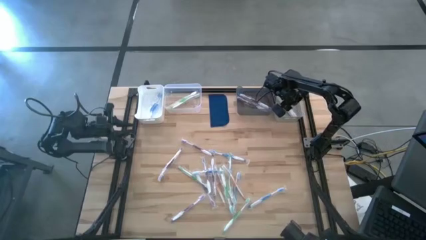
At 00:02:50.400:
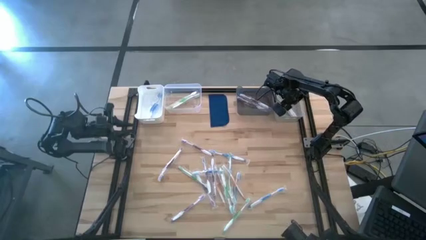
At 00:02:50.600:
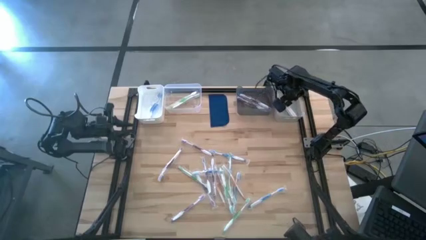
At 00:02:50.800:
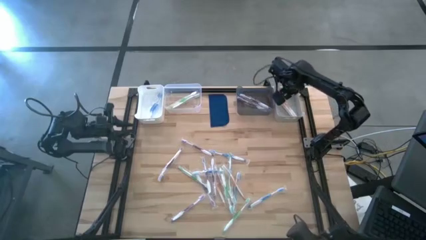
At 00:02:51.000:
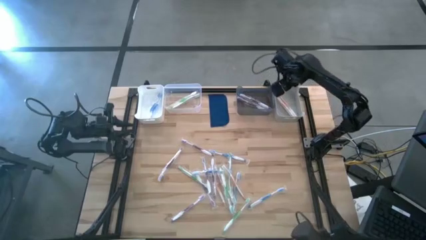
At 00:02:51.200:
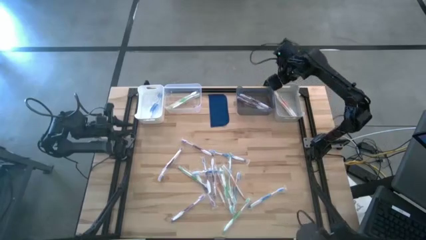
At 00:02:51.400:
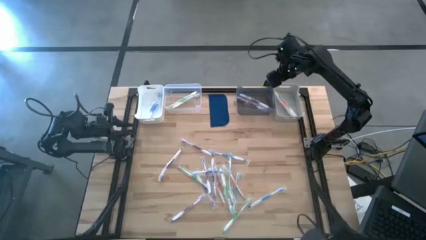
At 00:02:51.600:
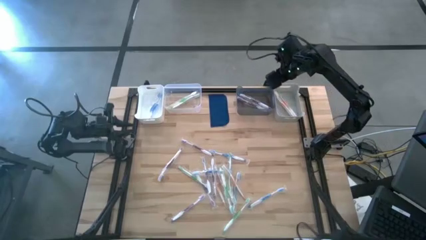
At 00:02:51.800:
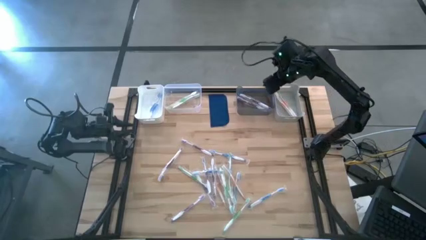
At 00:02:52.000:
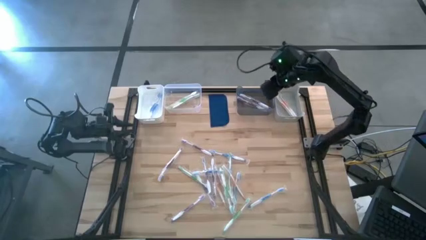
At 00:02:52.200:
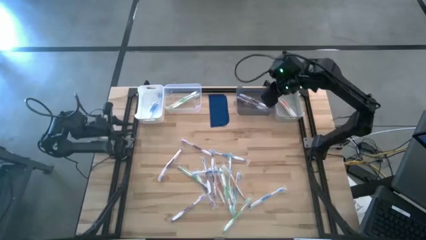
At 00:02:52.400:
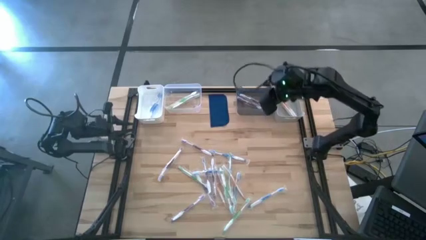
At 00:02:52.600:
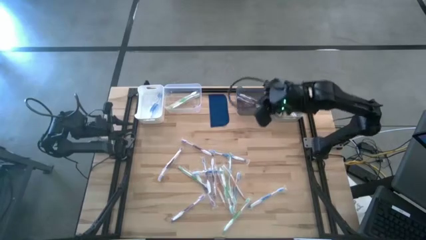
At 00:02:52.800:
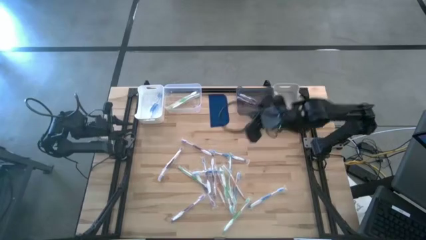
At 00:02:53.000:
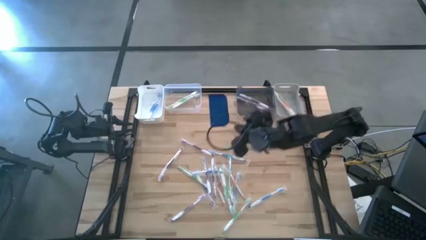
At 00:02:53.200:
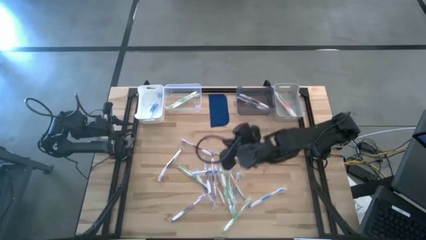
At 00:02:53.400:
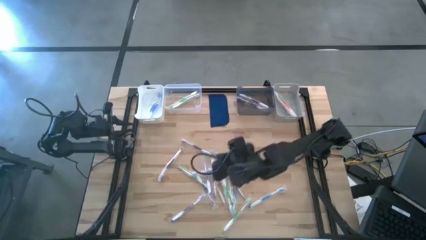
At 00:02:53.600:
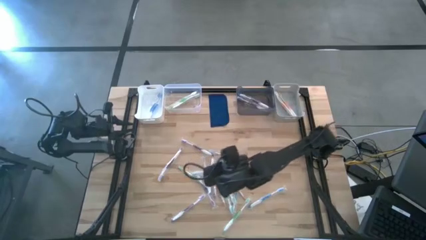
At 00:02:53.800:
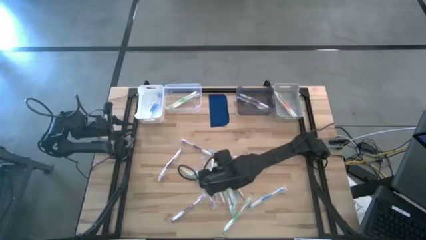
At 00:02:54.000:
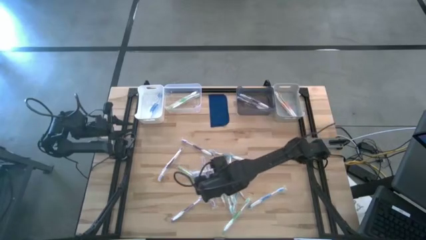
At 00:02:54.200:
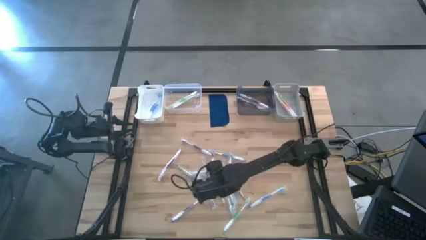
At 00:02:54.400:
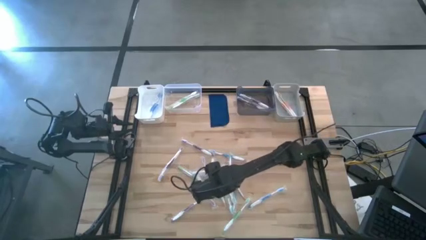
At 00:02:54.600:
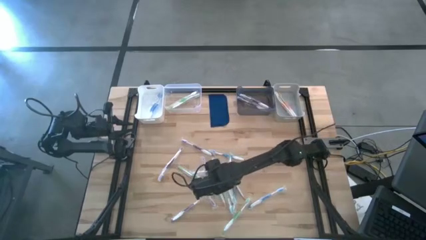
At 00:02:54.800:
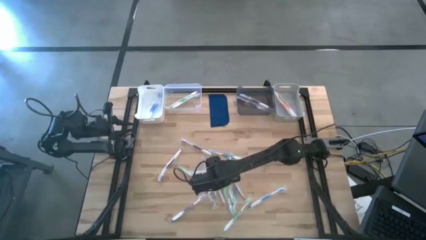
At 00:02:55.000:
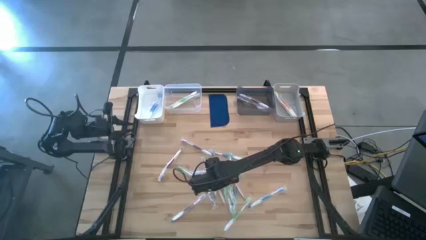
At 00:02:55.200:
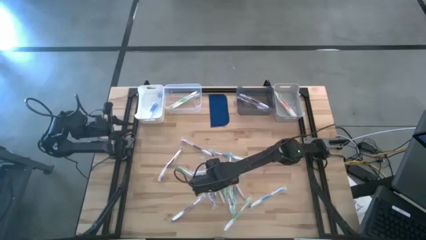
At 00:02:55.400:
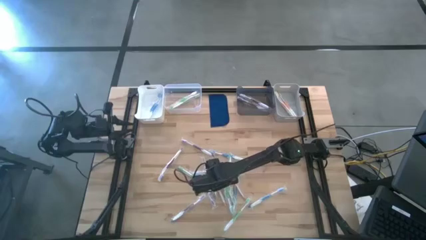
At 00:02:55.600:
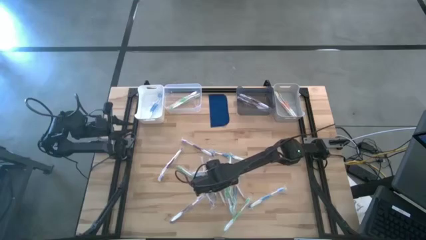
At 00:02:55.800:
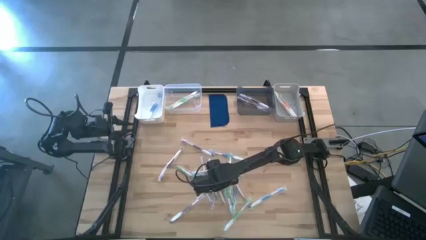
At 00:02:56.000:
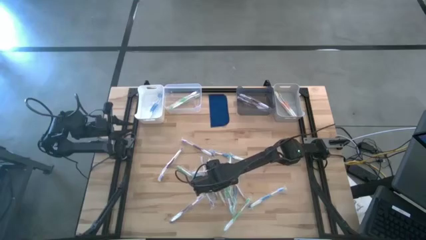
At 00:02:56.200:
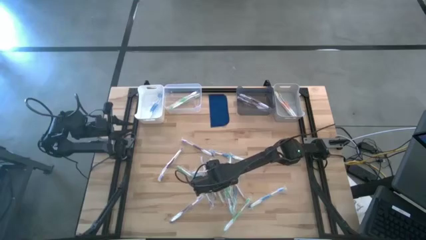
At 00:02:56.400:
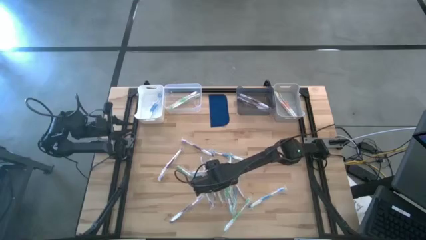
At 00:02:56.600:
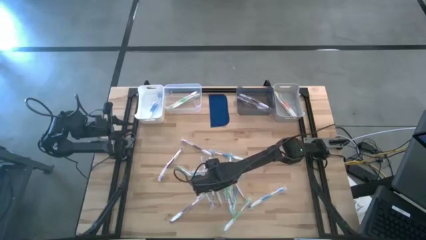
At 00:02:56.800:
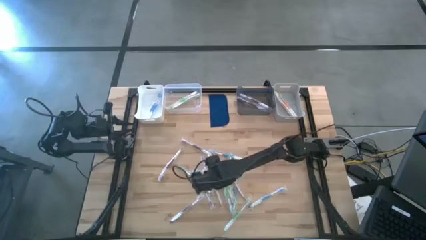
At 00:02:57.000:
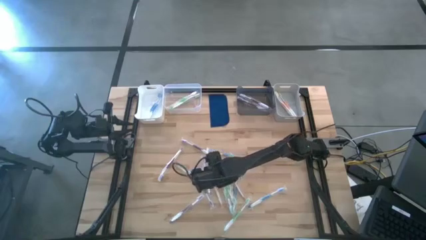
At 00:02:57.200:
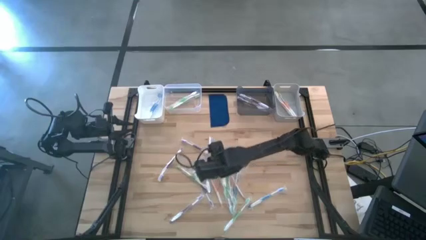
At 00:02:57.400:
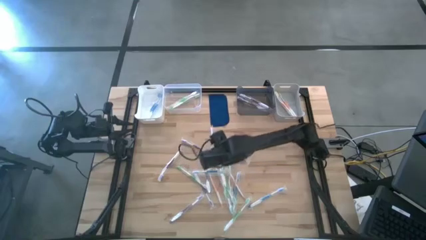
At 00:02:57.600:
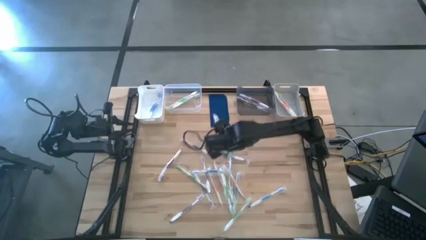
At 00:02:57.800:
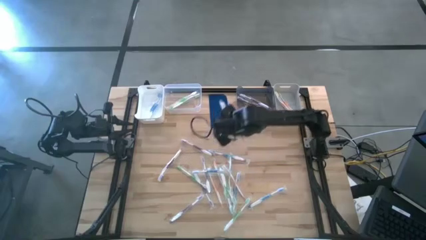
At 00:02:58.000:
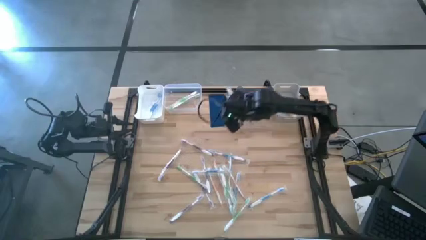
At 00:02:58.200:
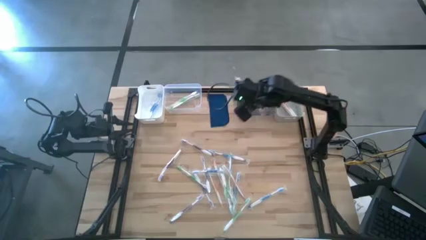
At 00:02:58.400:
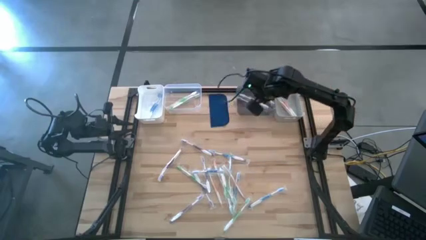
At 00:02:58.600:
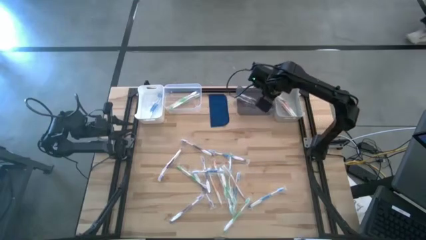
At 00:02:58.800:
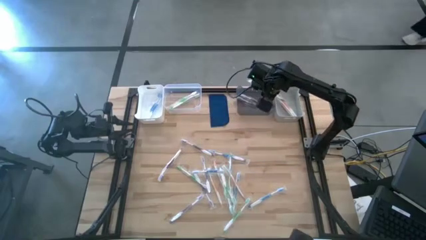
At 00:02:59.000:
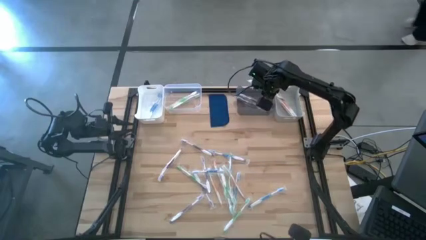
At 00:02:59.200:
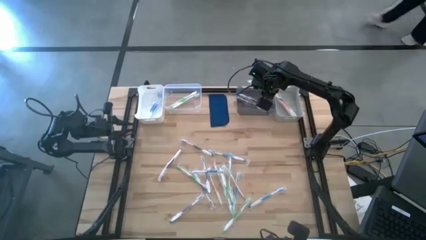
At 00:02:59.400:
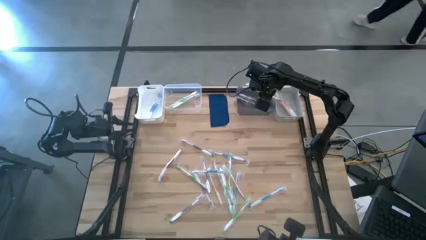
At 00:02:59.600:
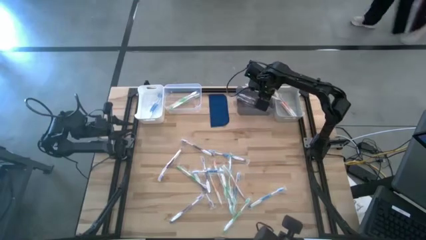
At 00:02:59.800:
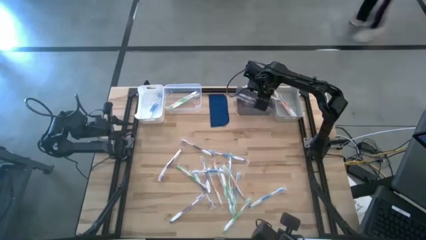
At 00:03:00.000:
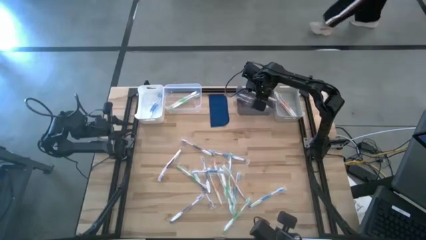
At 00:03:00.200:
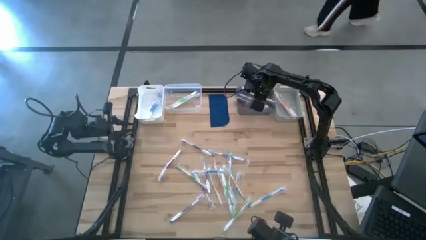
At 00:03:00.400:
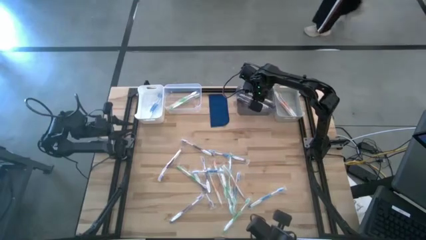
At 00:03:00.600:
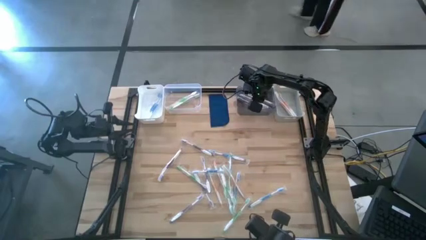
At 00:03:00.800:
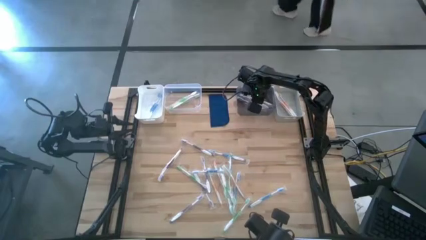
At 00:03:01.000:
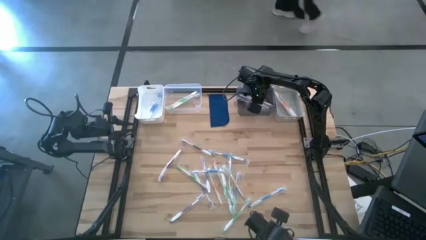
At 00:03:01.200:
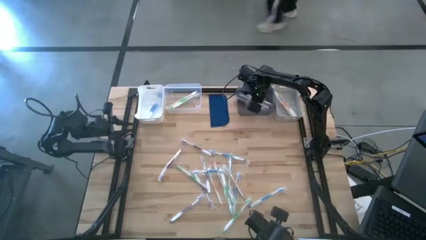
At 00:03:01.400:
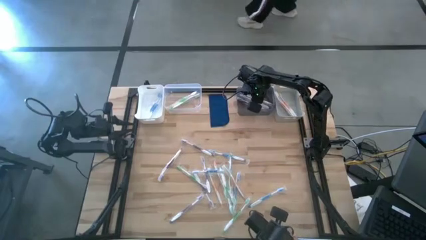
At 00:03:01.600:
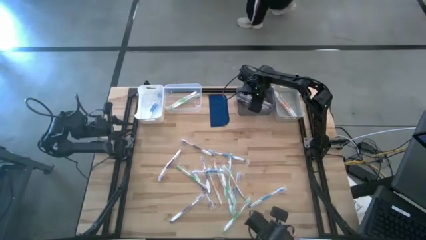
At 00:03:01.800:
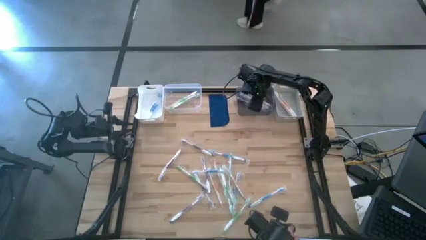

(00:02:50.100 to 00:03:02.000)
Task: Pick & Place Toothbrushes
Put the purple toothbrush into the black bin

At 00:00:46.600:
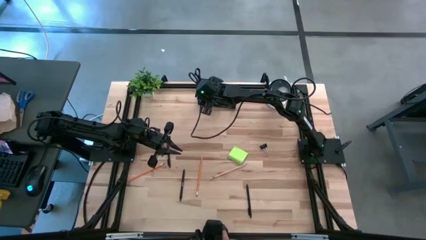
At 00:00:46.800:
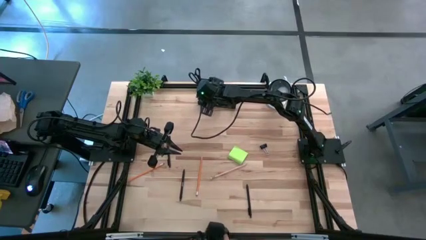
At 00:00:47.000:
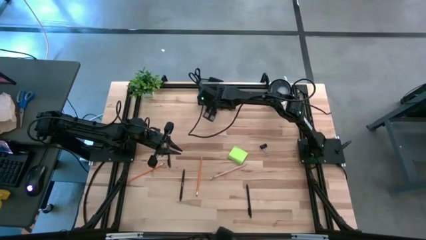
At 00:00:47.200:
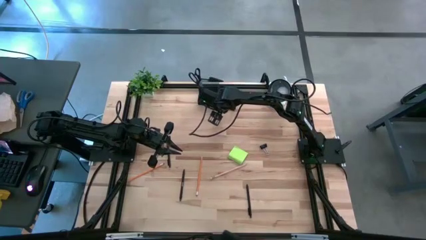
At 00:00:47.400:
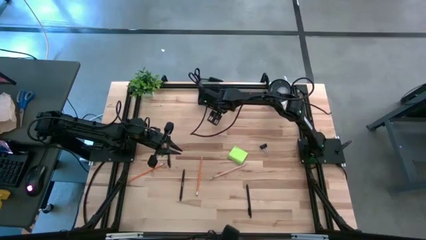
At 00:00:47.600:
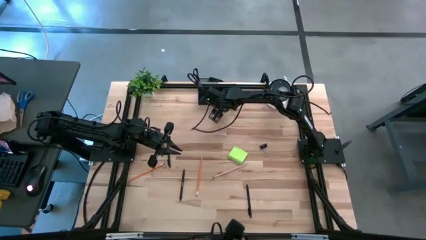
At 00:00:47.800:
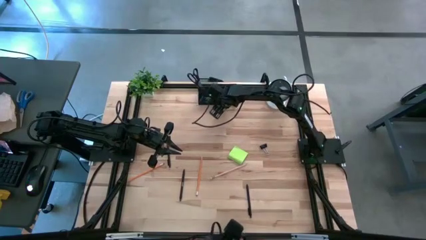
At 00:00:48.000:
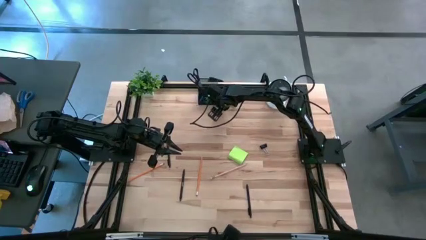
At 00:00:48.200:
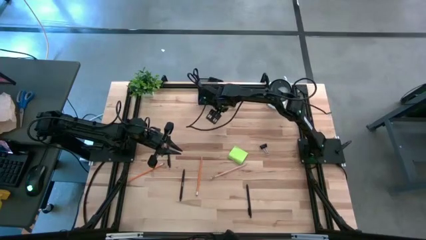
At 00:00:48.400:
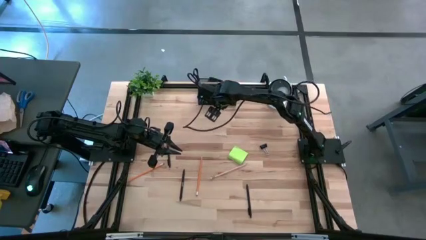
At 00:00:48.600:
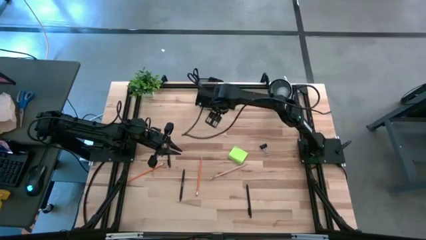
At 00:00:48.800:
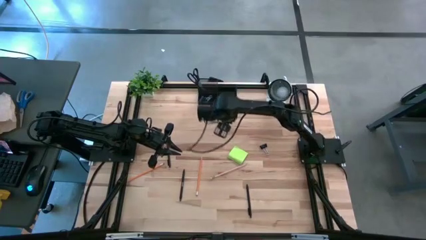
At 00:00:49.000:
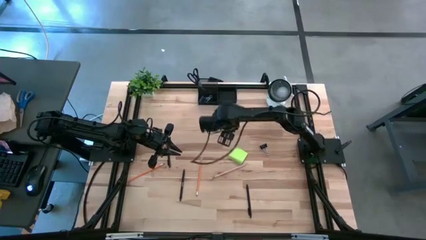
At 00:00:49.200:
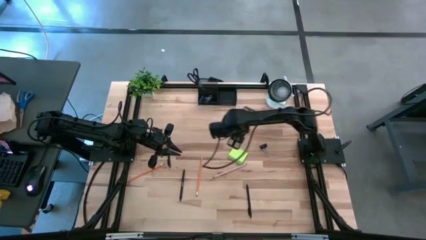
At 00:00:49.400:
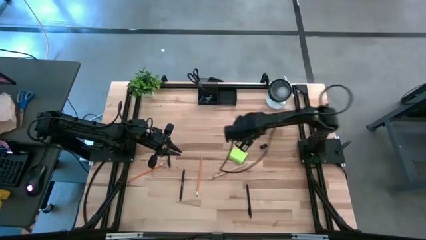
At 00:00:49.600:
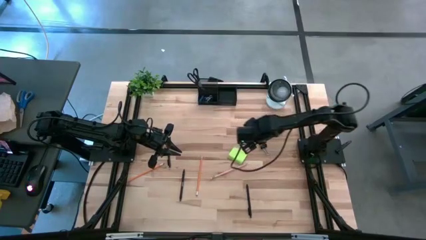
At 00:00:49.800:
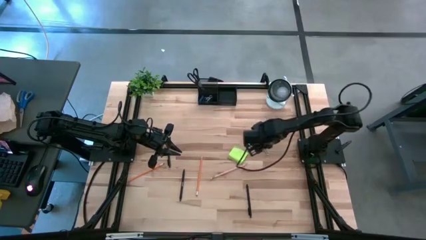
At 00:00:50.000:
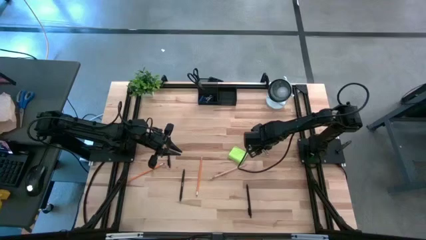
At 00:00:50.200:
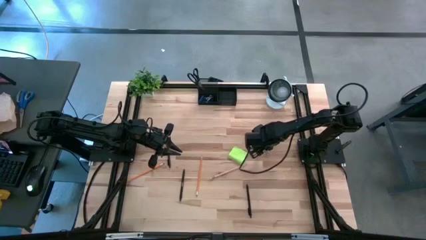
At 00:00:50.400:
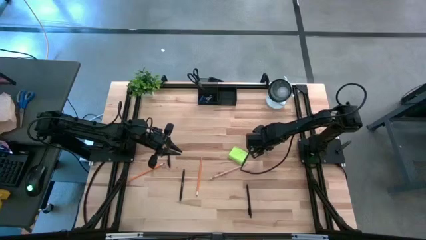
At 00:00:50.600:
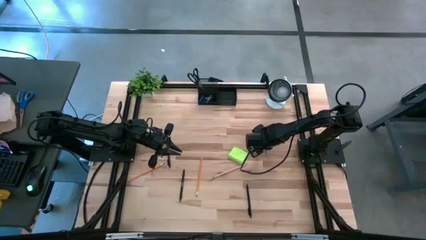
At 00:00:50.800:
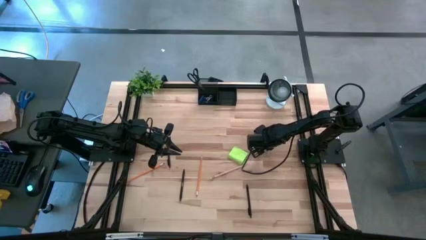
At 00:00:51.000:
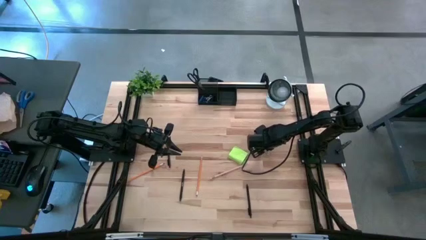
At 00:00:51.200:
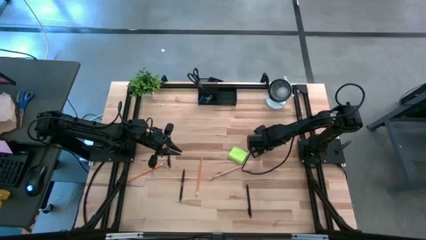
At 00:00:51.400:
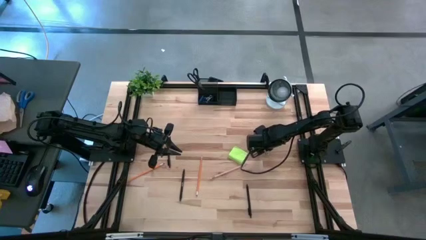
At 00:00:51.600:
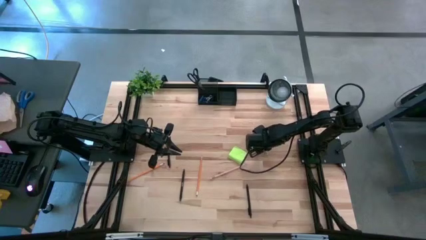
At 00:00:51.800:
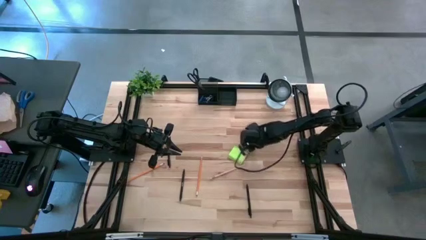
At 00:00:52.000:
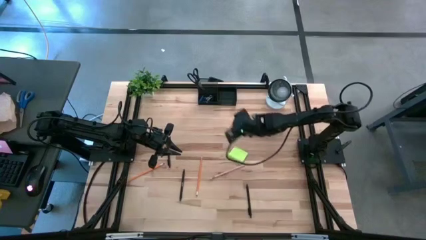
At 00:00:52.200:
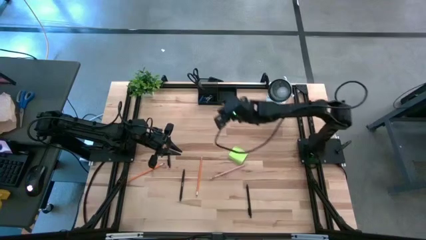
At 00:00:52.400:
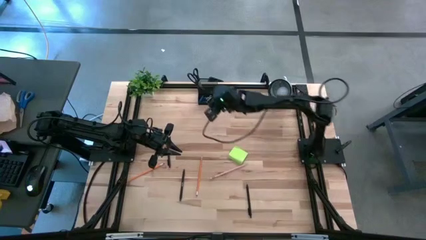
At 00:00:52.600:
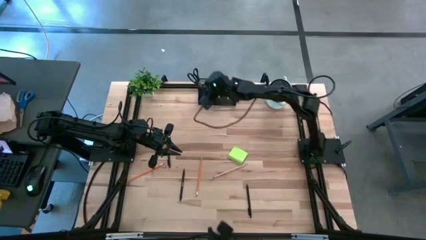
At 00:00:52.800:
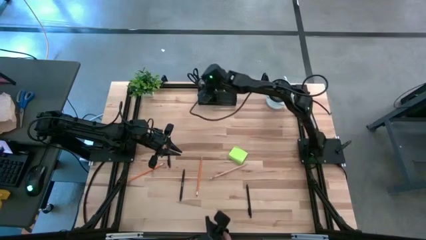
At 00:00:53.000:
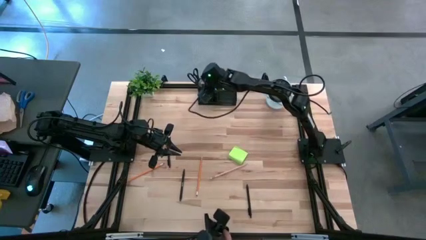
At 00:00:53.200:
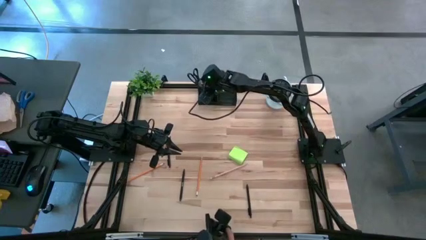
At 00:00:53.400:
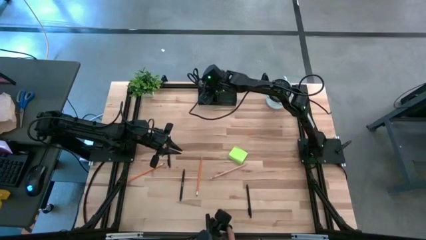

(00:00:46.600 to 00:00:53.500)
Task: Pick and place office supplies into organizer
Put the black binder clip into the black desk organizer
